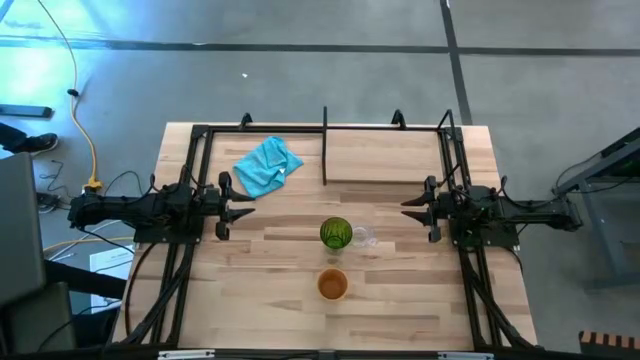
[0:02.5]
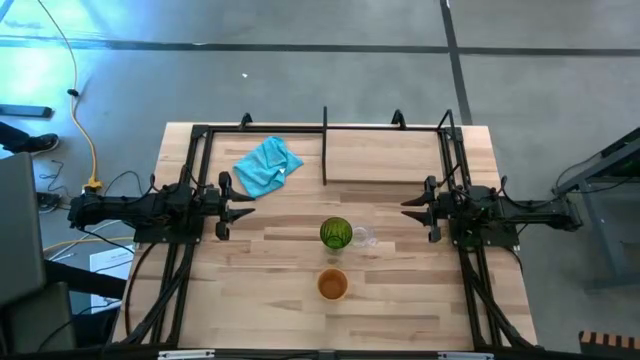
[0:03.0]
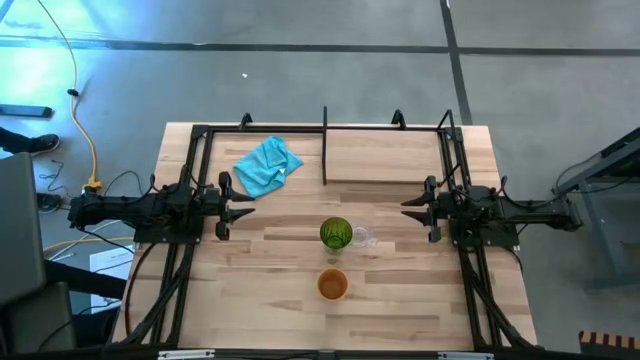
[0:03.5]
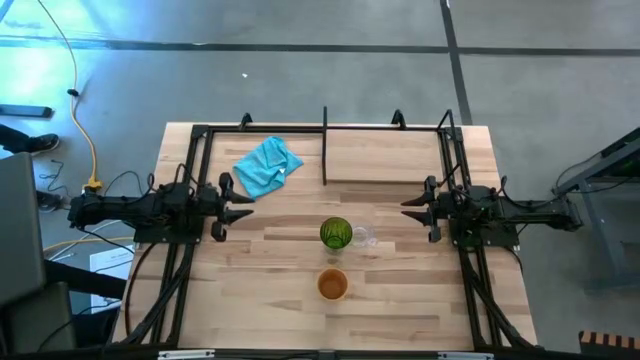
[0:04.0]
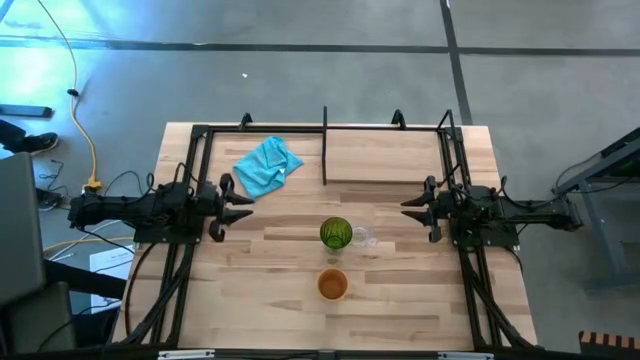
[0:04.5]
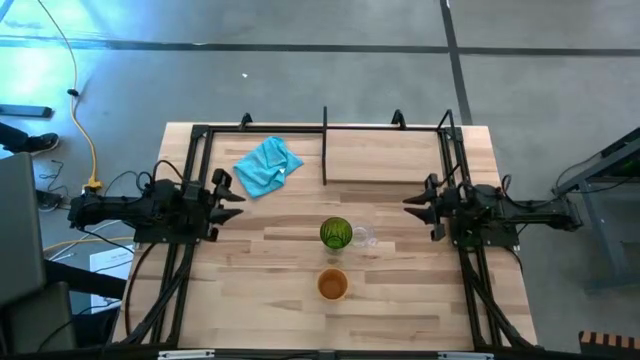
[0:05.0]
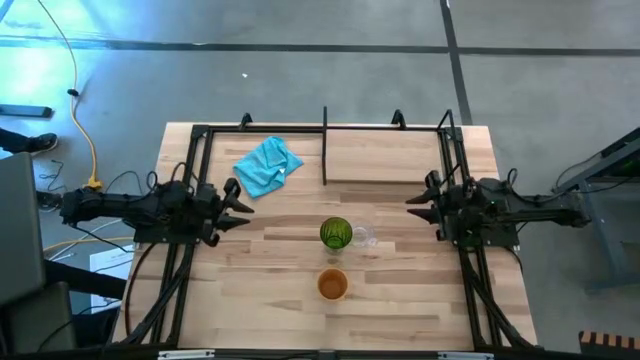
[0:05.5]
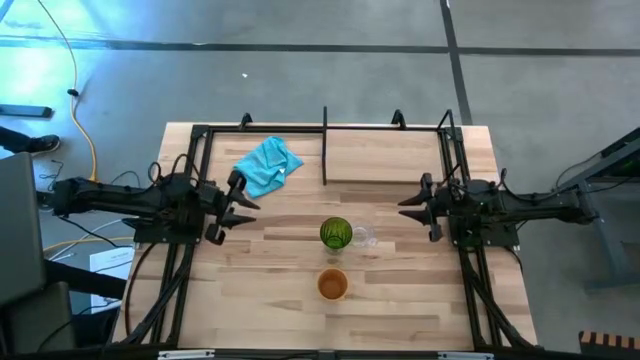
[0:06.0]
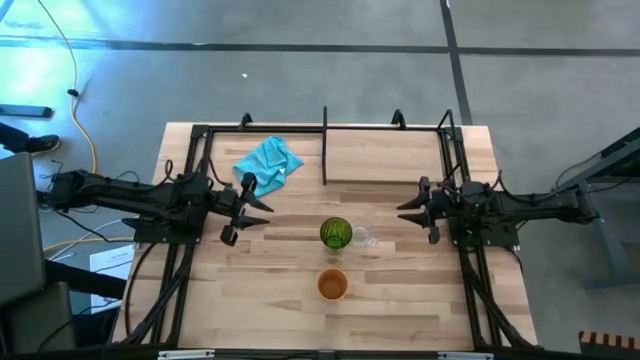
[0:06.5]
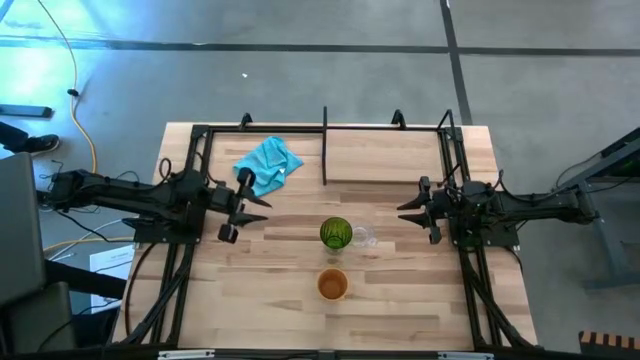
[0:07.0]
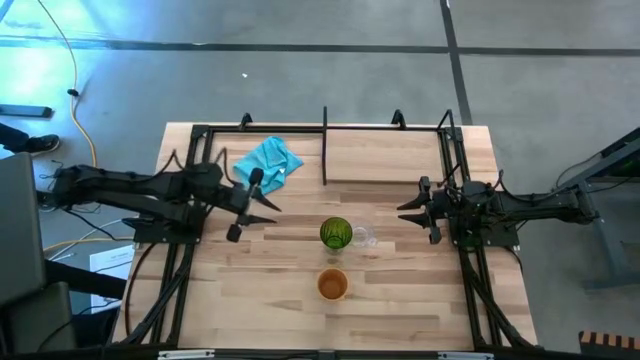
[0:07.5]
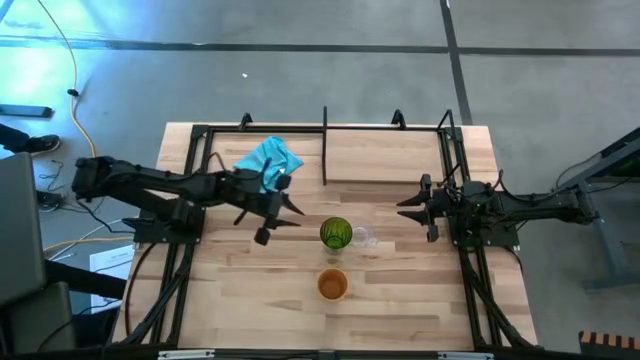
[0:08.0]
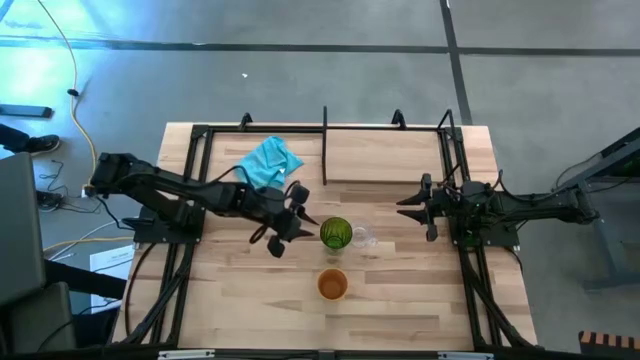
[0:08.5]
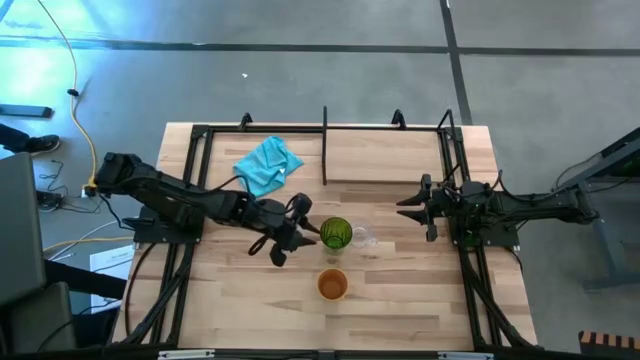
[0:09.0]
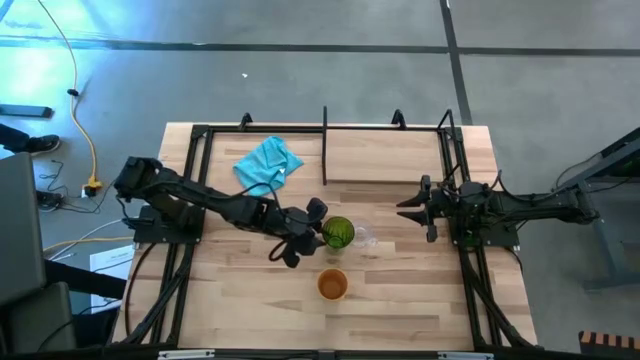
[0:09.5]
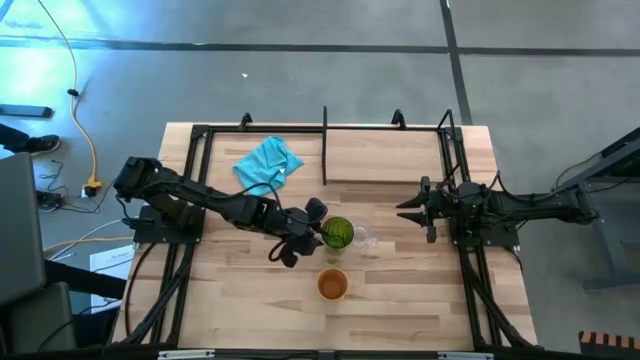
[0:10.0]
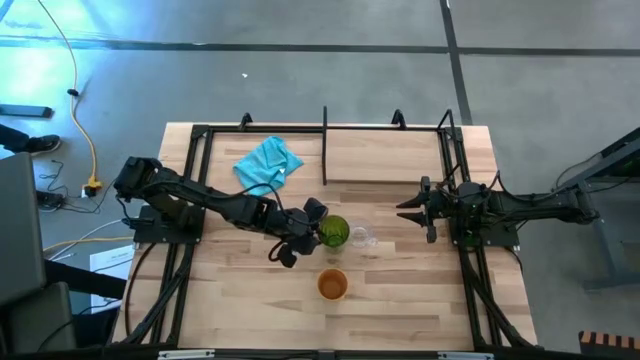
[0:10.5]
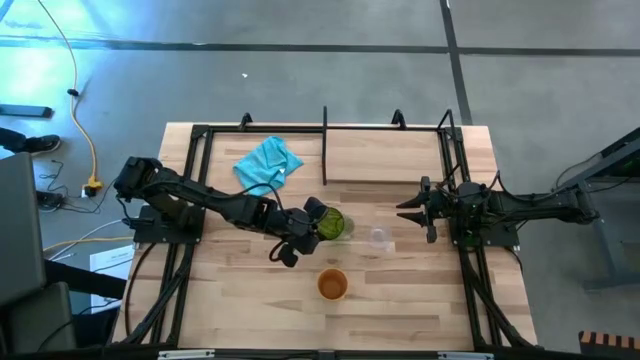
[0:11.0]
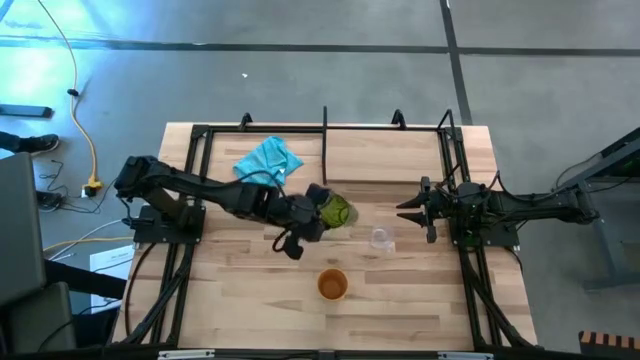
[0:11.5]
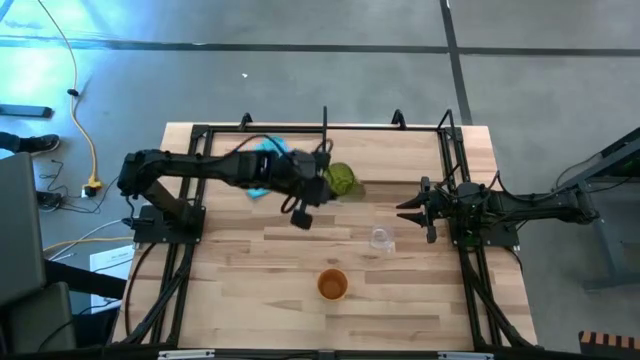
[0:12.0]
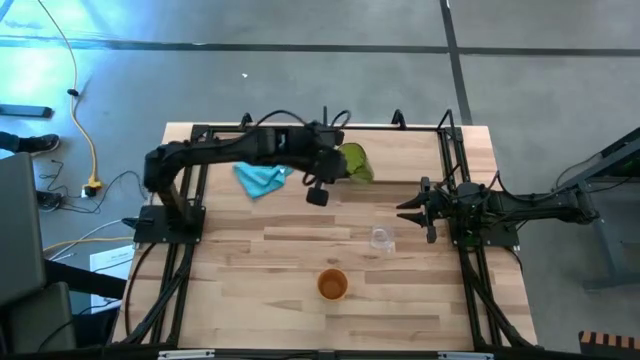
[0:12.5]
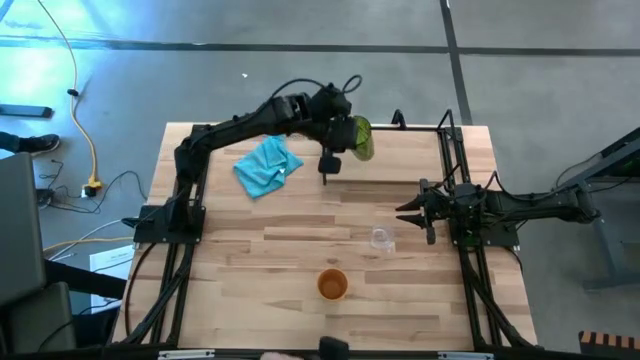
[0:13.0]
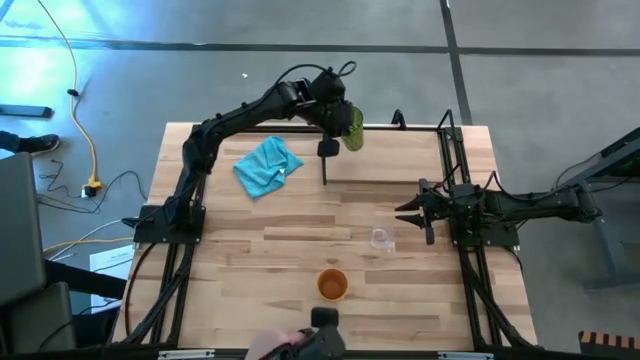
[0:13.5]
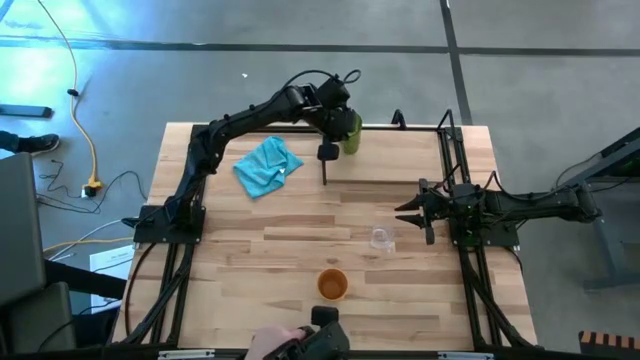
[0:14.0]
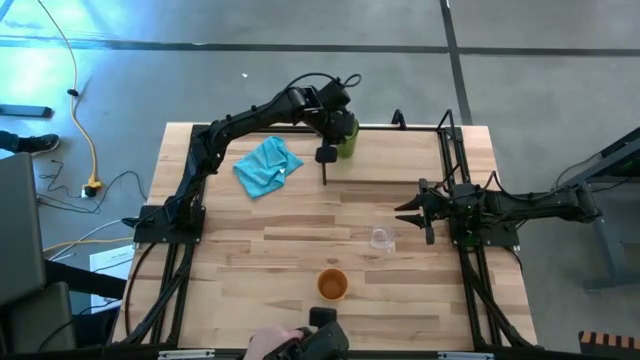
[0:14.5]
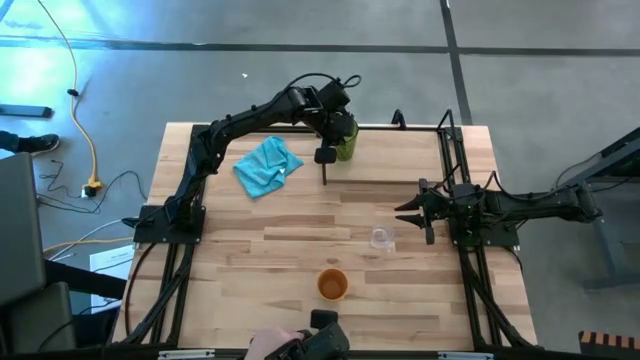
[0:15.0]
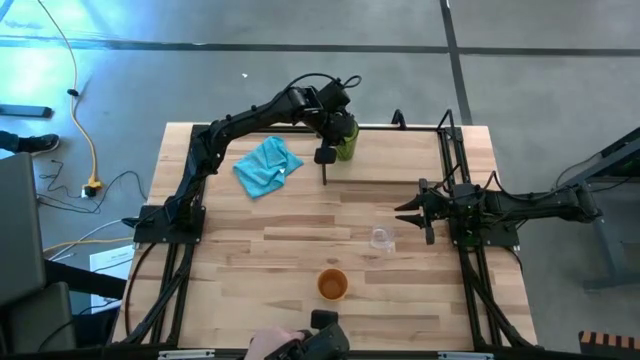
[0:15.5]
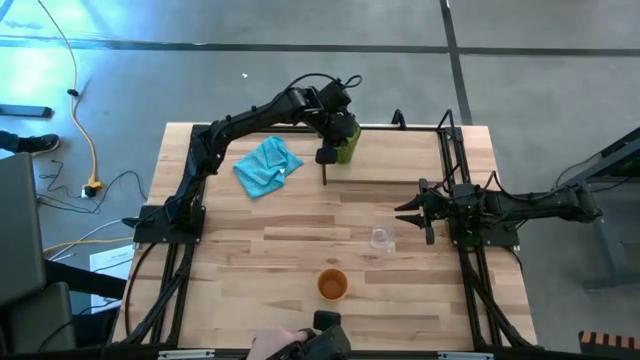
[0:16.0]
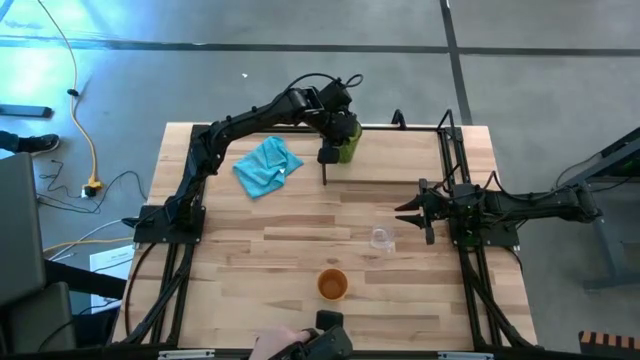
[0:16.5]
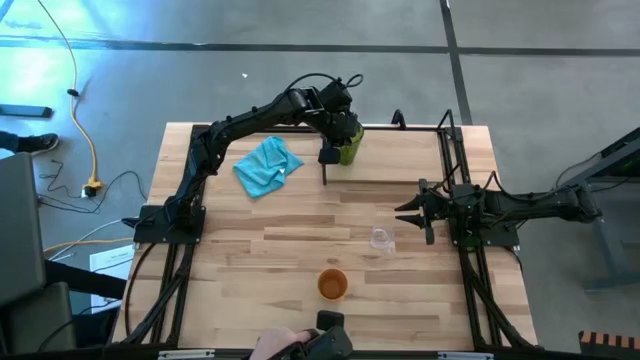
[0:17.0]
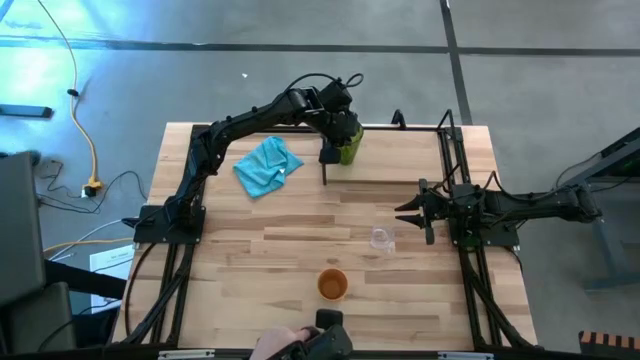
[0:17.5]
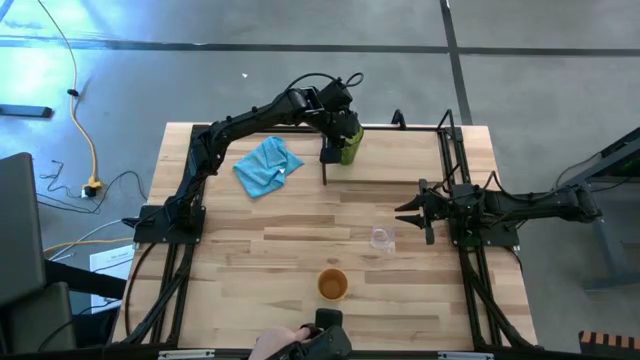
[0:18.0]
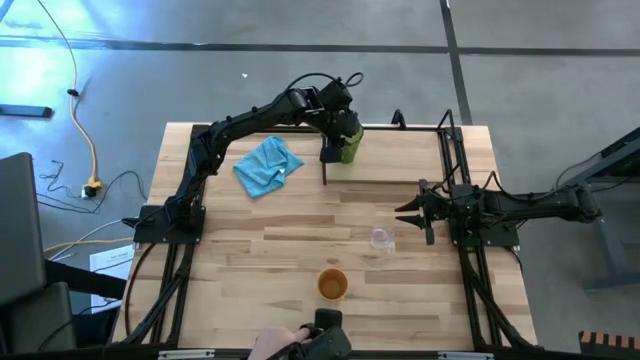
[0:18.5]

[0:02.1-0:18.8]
Task: Stack small to large cups/mugs on shelf
Put the green cup on the shelf

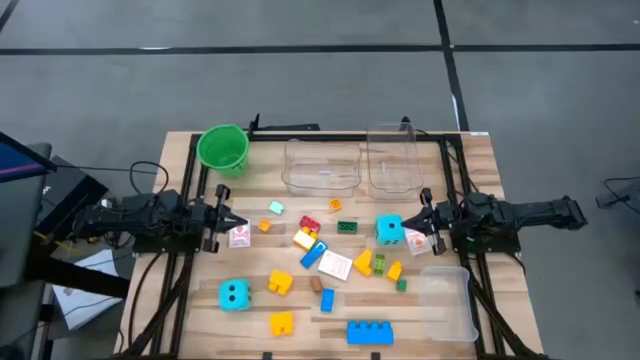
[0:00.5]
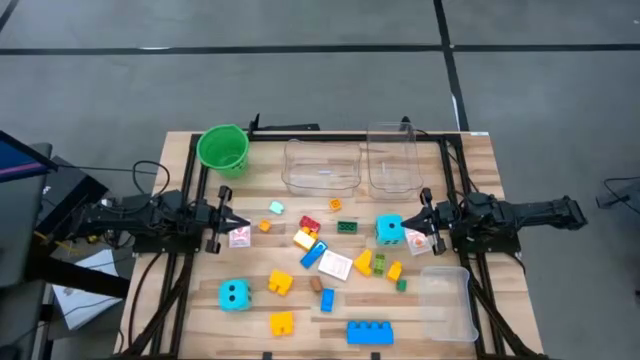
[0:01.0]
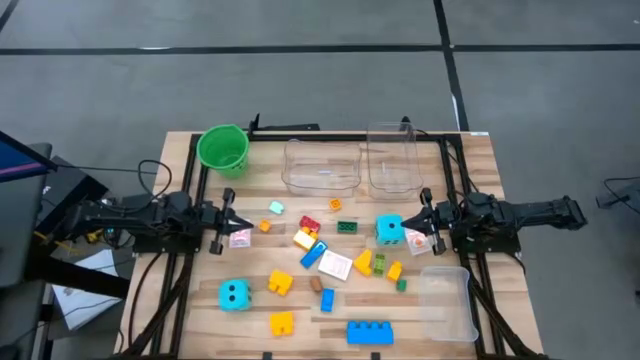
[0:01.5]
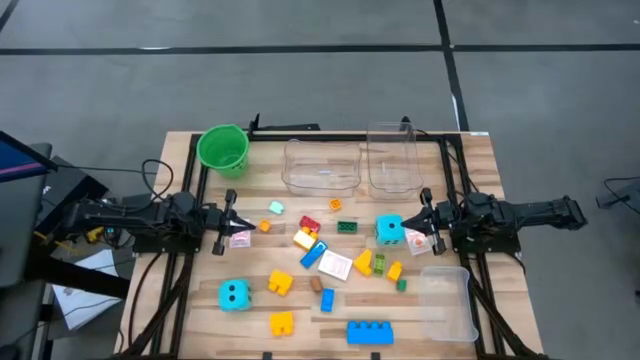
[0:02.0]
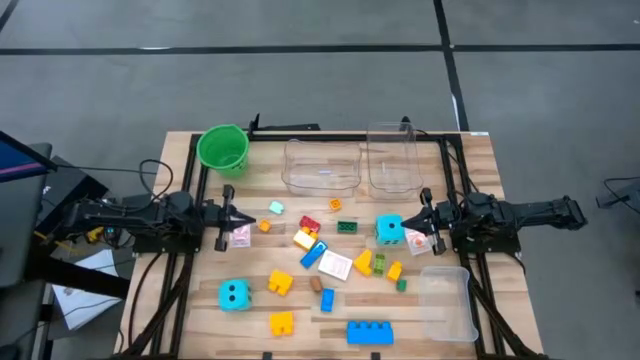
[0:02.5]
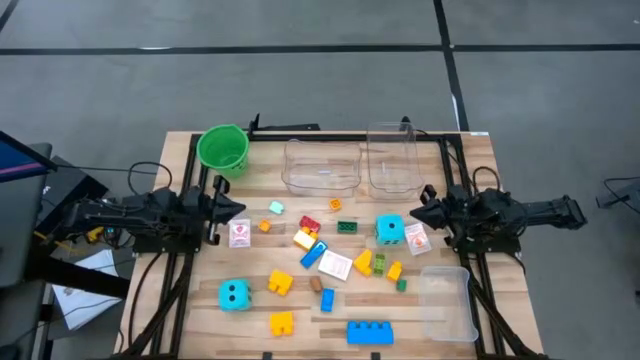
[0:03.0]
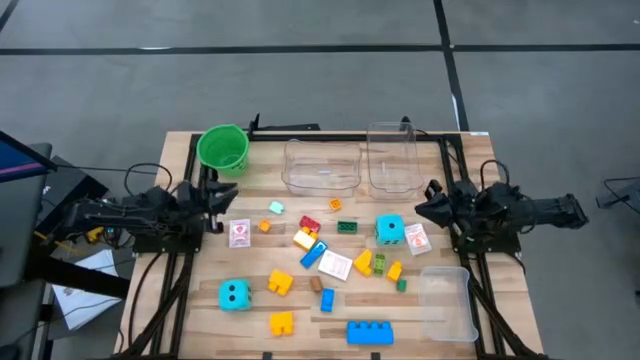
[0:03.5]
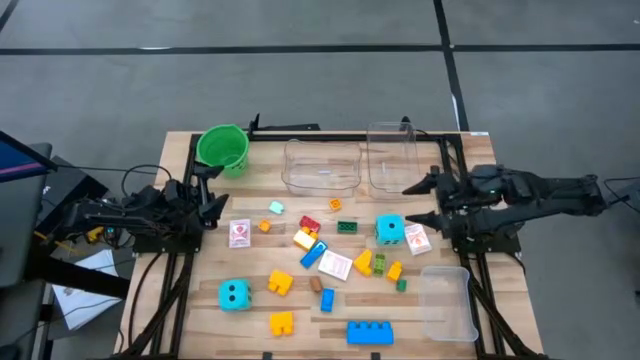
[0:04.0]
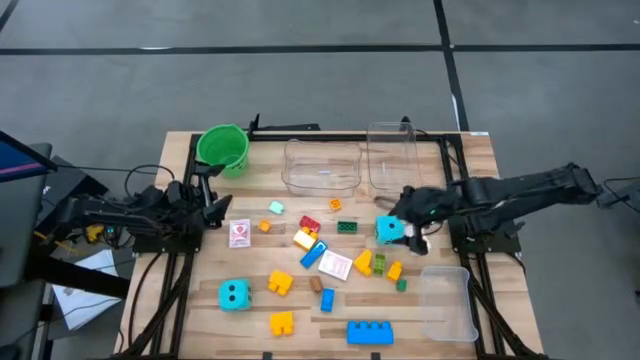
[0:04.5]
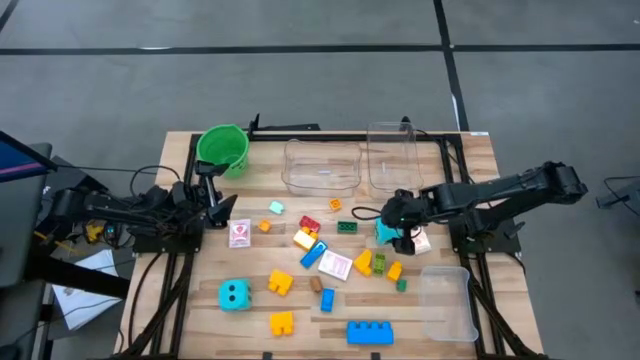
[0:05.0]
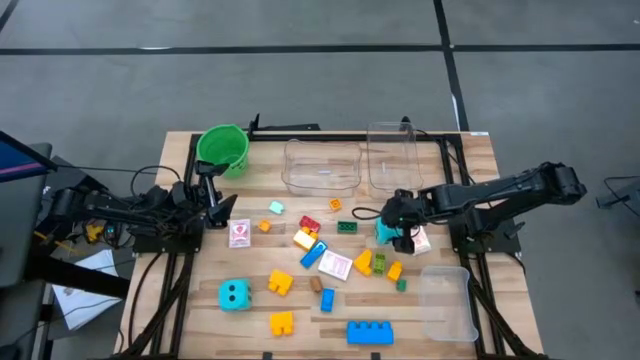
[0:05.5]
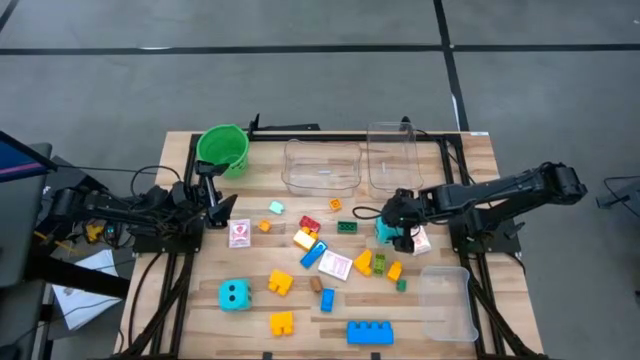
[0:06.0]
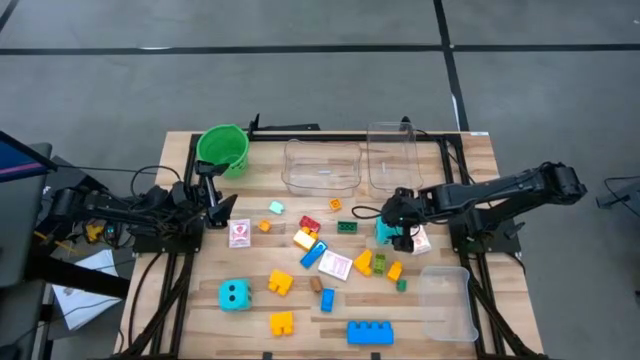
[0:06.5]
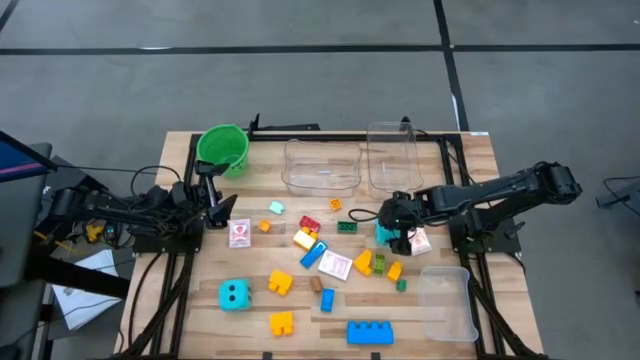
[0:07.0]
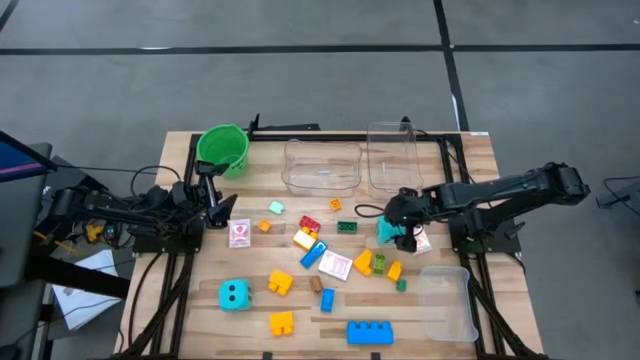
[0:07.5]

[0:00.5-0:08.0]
Task: Pick & Place Toys
Put the blue dice into the right transparent bin
